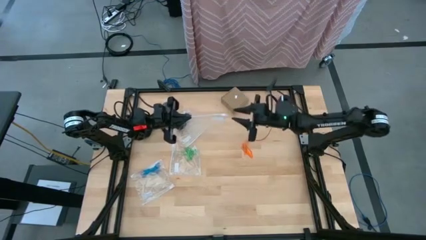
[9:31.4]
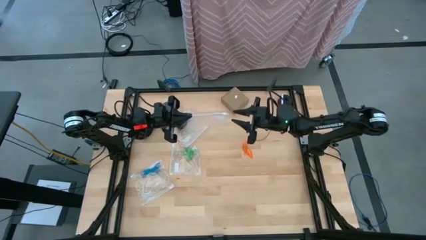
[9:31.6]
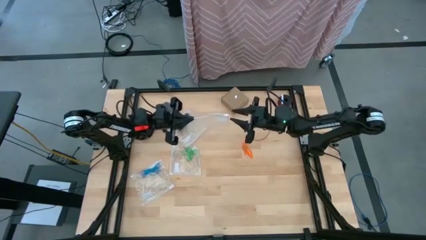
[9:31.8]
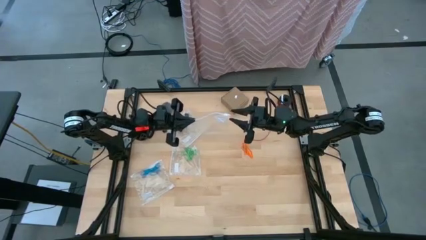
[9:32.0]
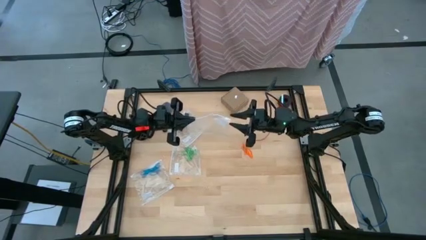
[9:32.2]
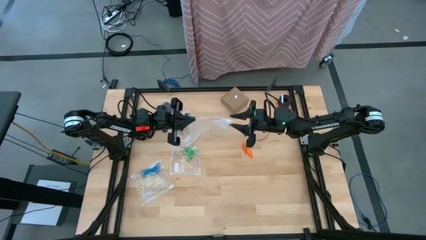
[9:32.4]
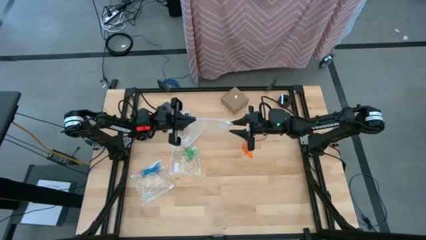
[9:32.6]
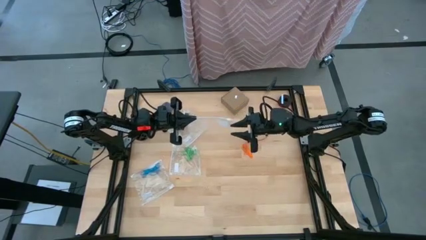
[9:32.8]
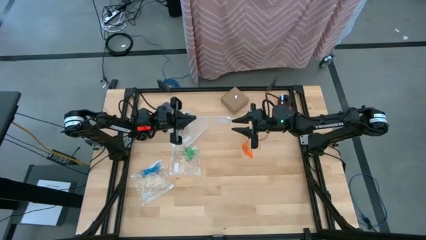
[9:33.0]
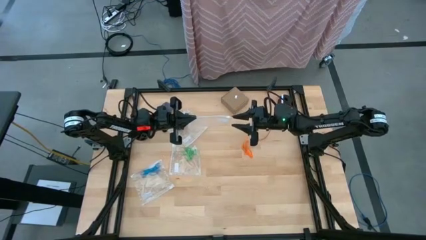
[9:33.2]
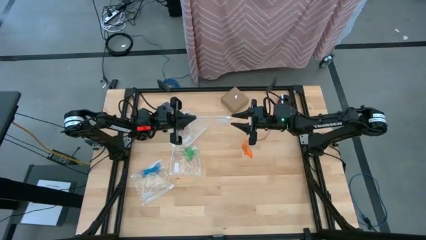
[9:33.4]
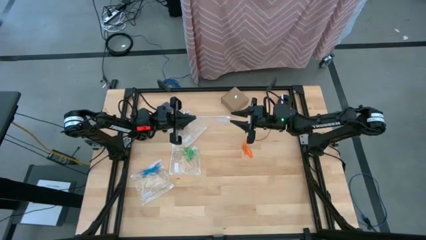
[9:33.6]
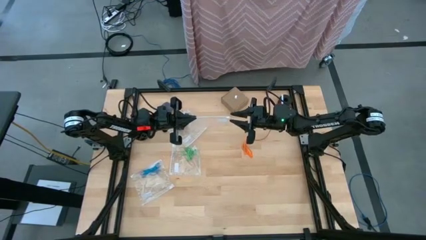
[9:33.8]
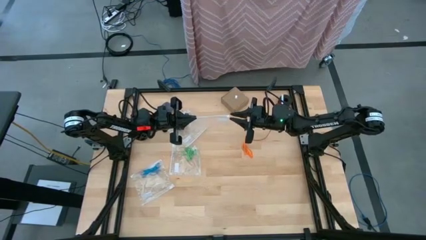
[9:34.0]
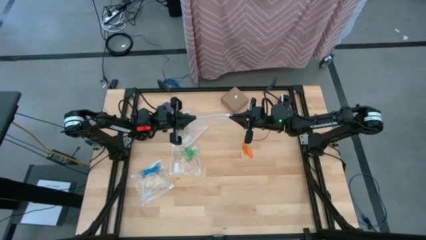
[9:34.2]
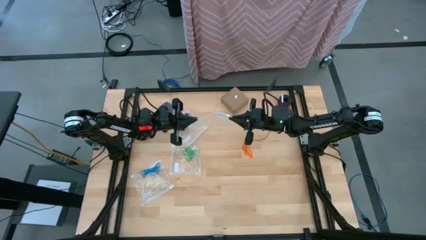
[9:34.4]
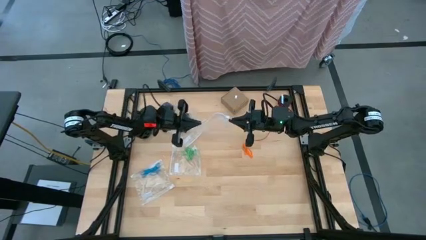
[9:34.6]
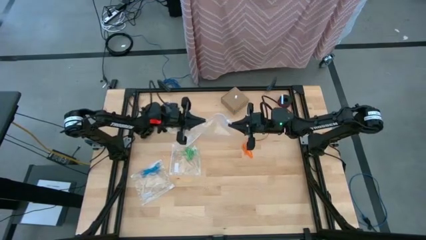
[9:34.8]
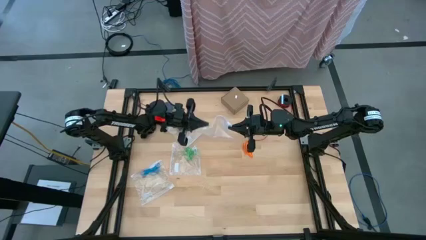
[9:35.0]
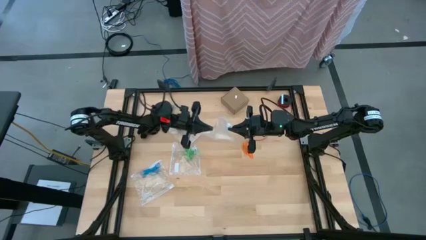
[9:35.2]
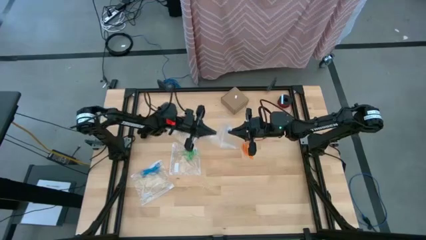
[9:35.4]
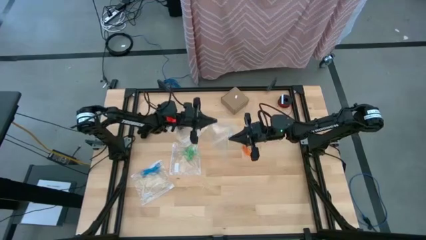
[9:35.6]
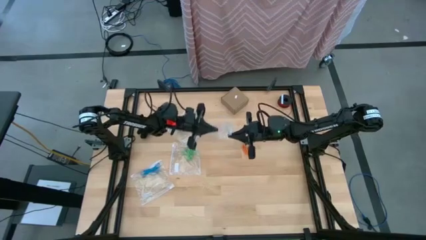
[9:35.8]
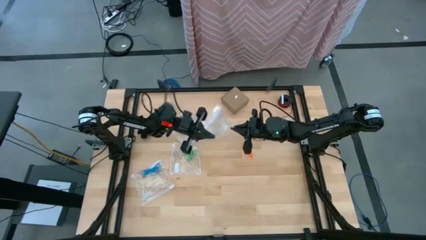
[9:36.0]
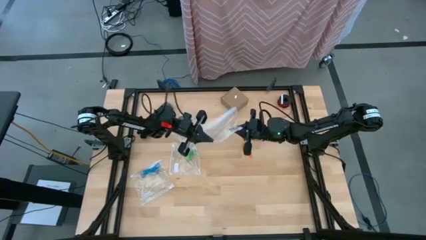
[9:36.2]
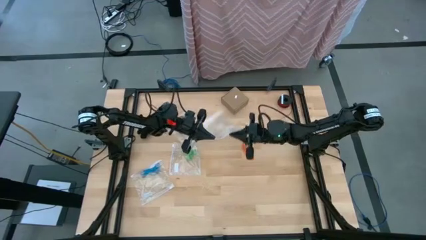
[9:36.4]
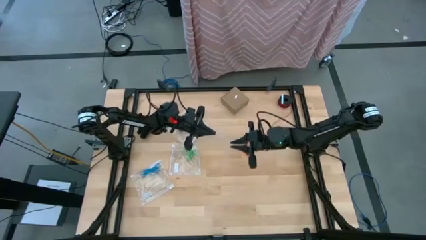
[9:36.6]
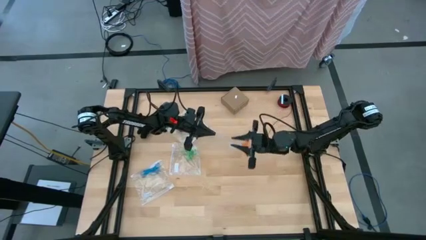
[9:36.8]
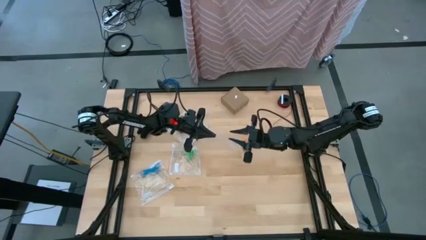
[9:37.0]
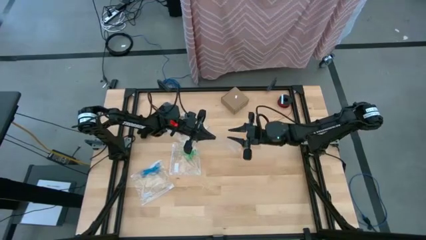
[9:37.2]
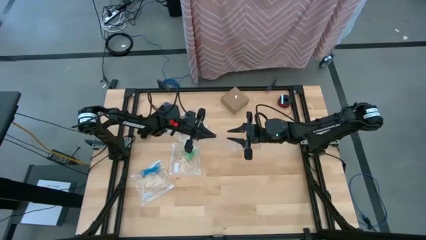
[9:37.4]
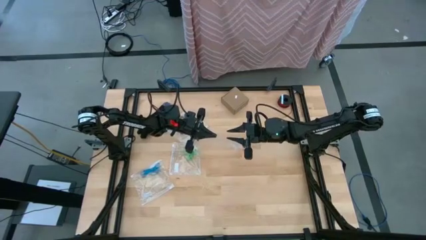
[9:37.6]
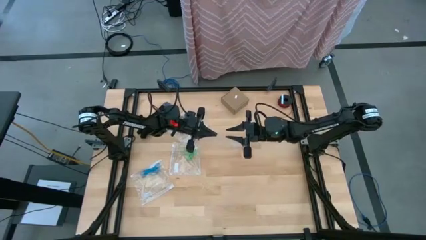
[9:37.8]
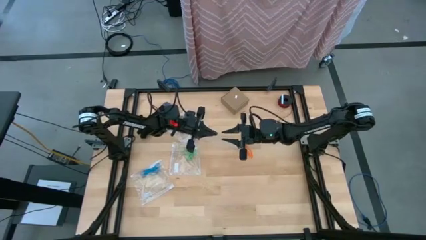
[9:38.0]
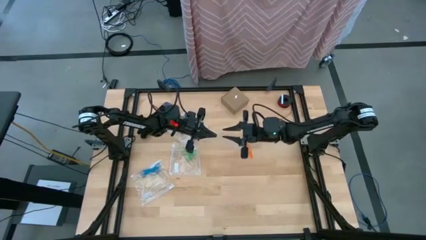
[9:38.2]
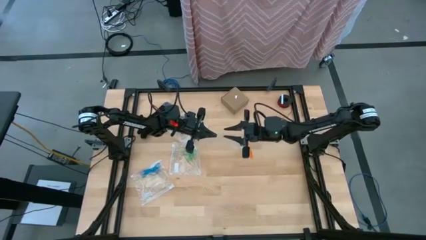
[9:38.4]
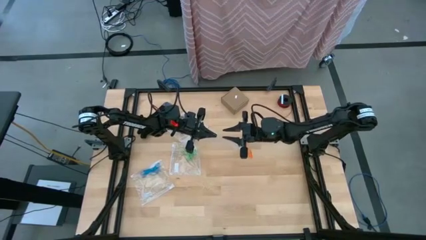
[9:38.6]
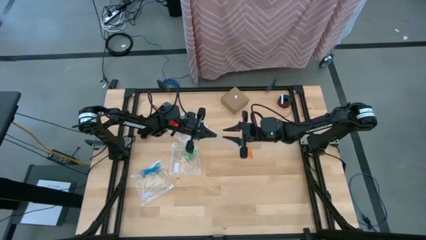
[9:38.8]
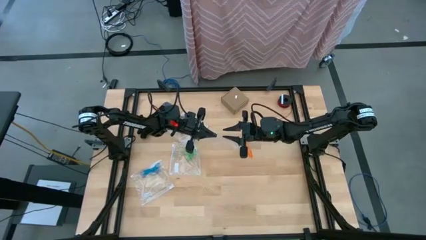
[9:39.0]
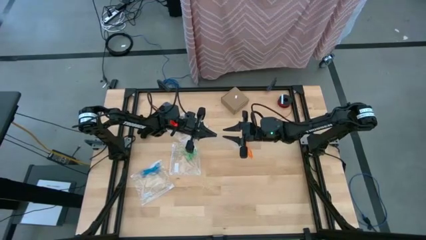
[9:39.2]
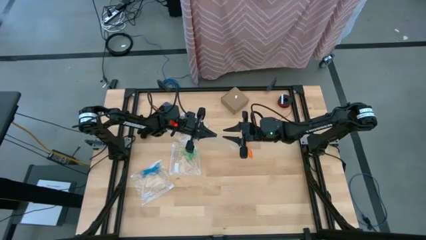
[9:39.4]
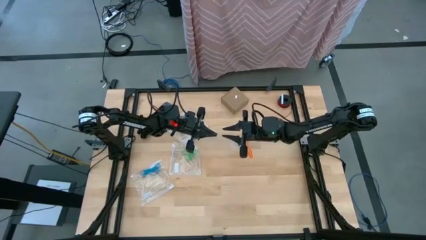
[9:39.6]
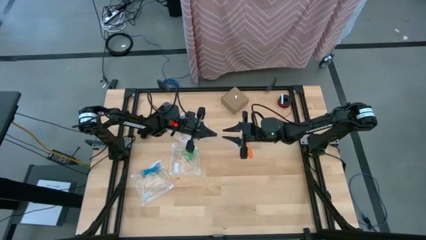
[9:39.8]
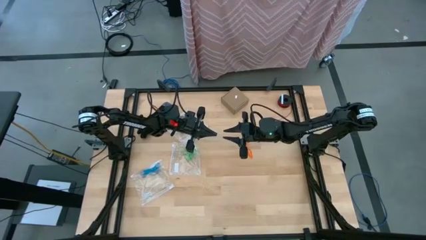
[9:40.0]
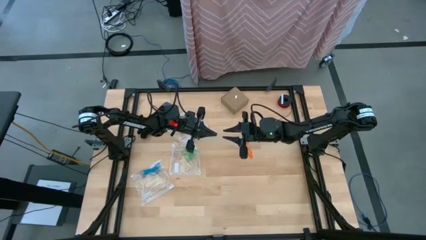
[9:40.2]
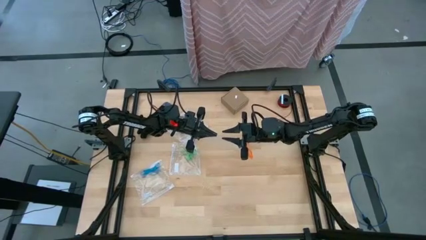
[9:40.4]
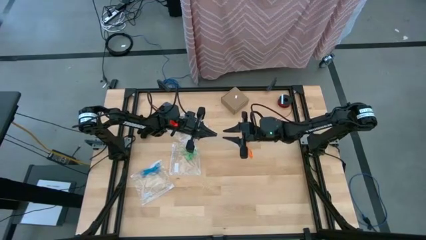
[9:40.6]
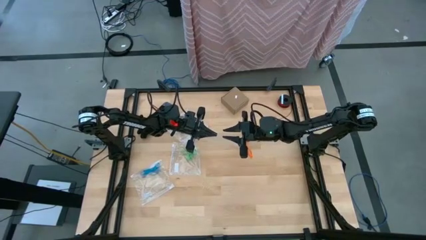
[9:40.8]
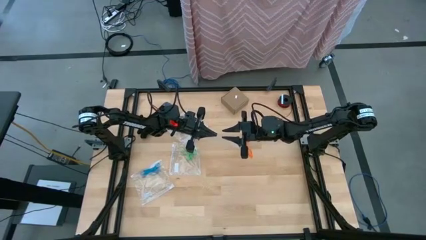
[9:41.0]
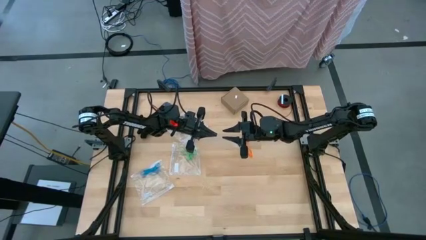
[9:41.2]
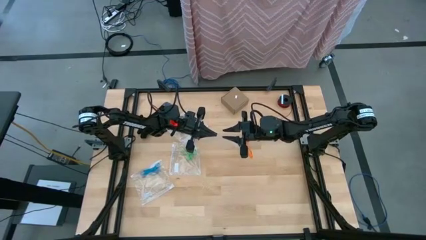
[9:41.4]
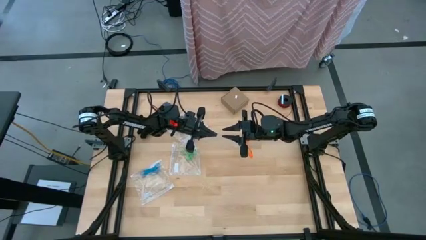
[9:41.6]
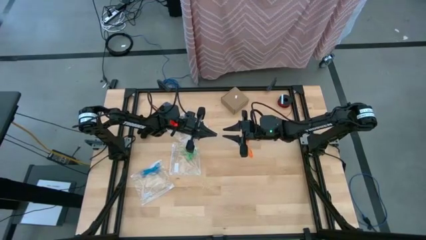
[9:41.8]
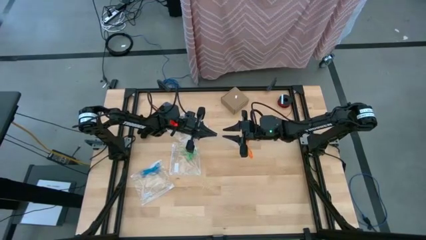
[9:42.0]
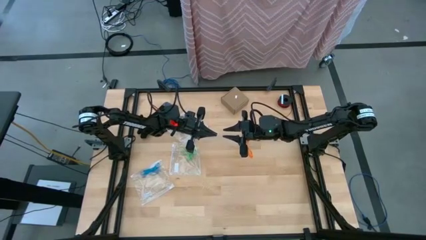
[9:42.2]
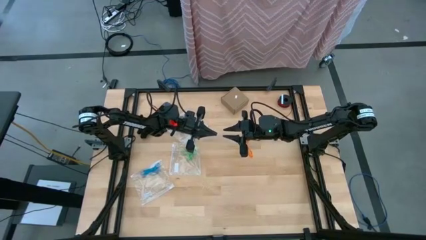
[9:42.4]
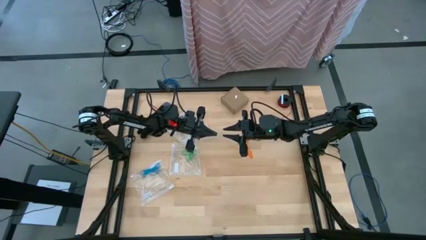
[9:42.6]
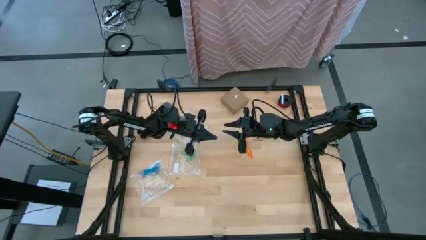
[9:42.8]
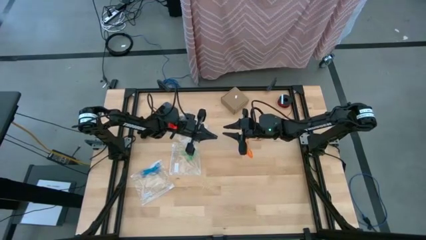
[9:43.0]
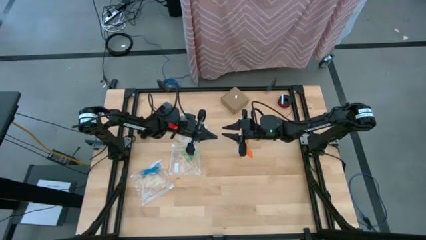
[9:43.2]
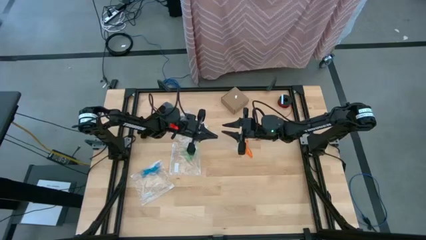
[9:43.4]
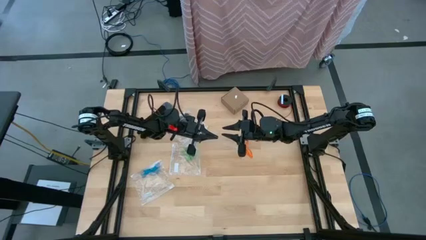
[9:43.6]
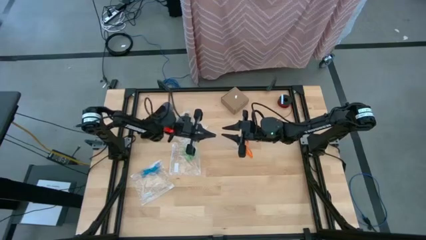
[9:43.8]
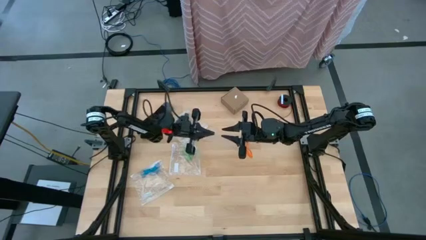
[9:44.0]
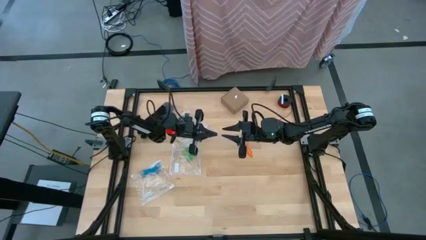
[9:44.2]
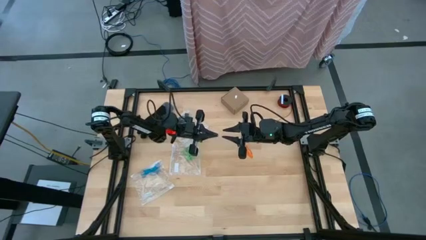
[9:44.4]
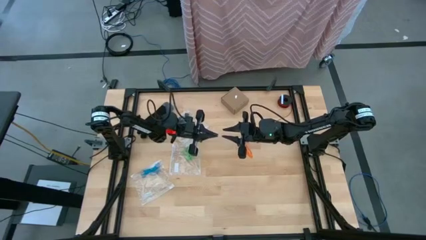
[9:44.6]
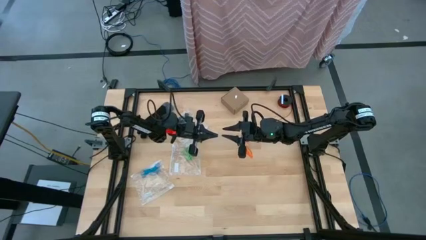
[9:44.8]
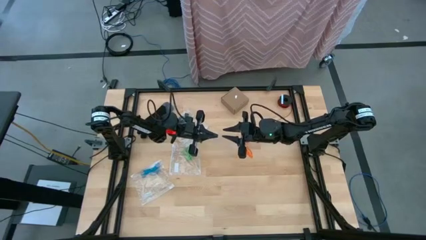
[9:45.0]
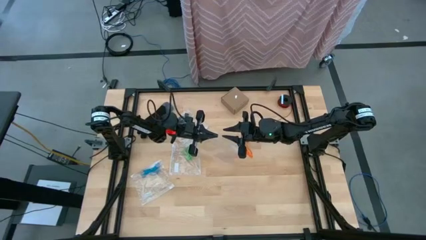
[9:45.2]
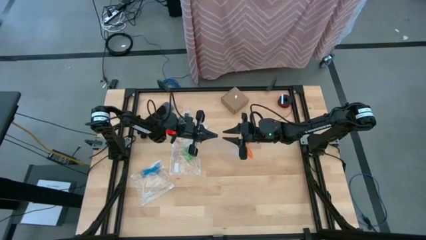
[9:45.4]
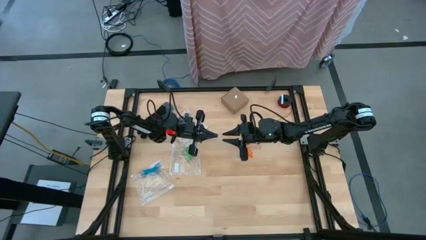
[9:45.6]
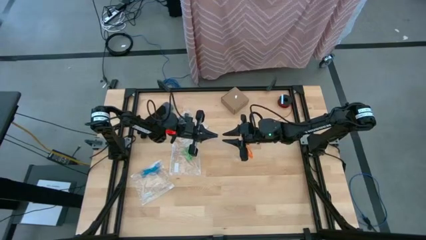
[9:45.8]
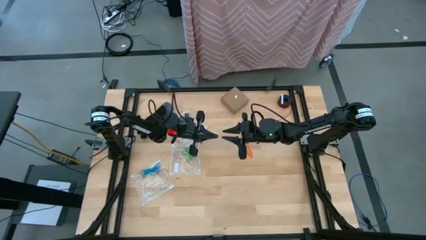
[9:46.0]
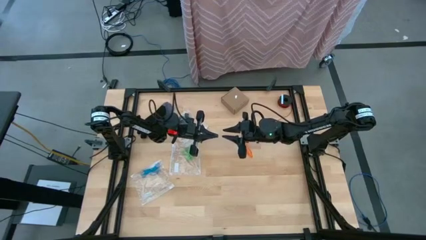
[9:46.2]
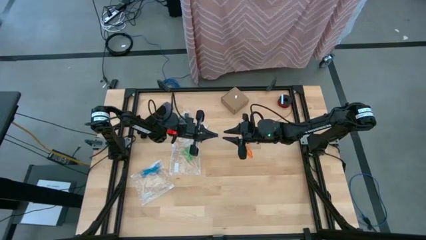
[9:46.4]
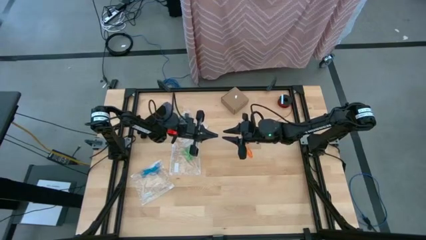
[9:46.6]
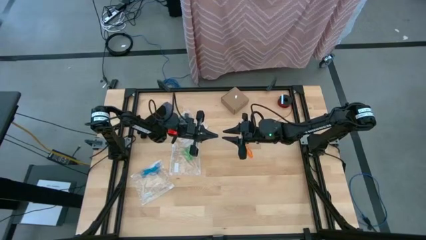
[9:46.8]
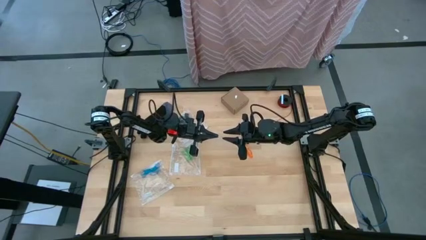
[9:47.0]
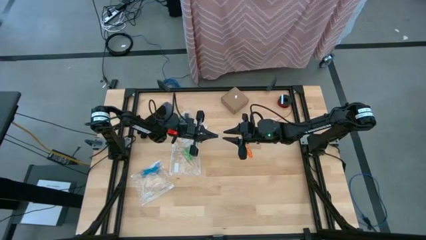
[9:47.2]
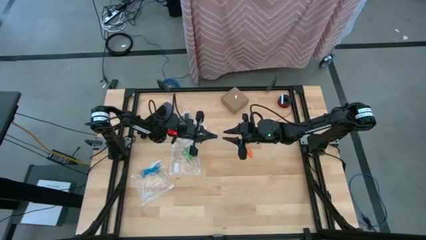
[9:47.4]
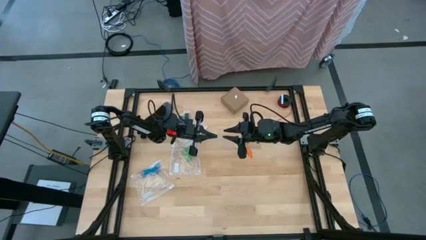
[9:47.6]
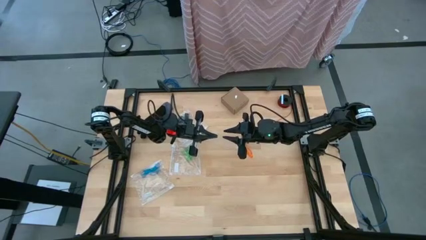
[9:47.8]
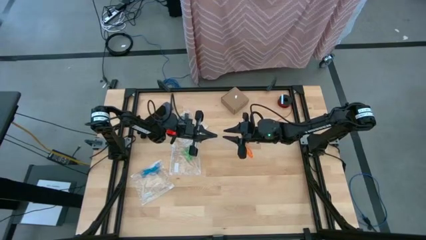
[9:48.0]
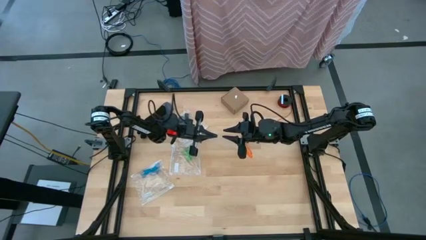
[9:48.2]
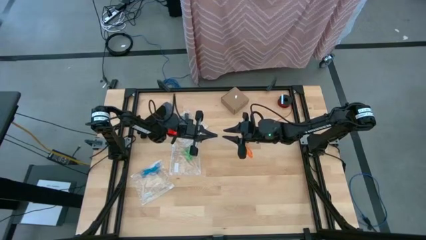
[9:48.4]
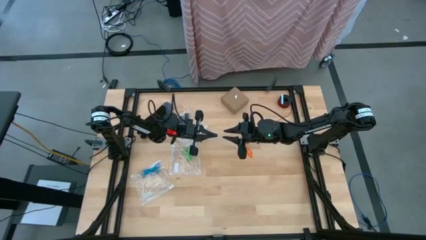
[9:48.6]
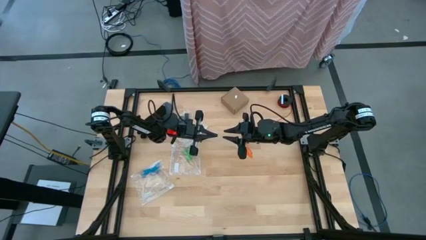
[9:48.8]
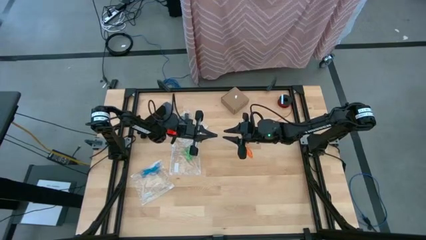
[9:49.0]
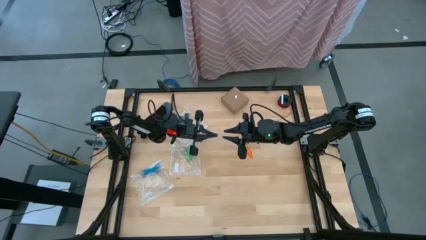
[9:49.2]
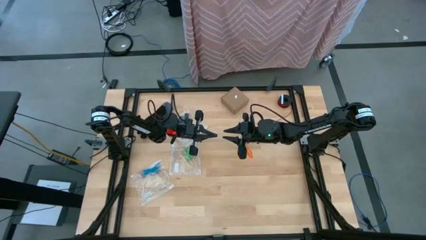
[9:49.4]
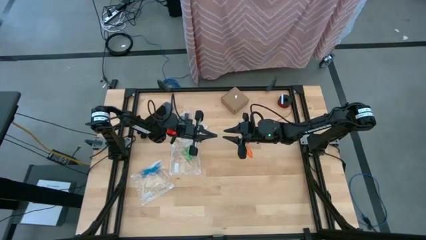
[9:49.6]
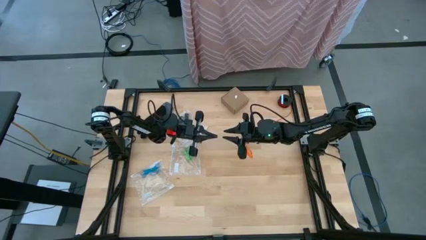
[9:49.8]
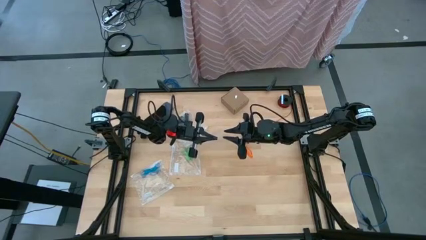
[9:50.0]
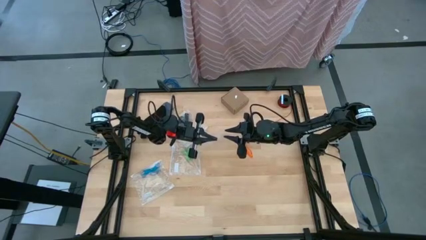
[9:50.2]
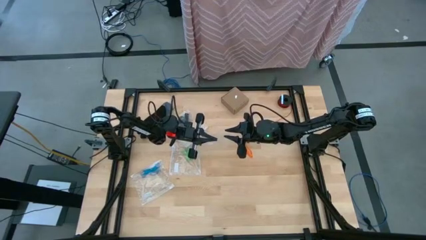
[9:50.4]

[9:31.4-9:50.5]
Task: Sort rubber bands
Open the transparent zip bag
